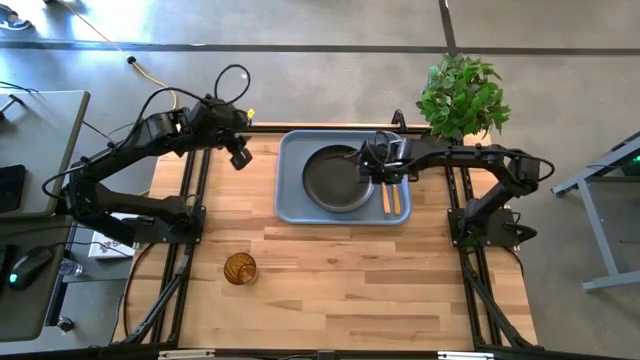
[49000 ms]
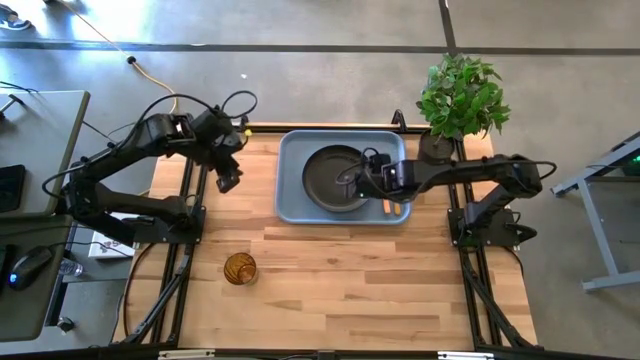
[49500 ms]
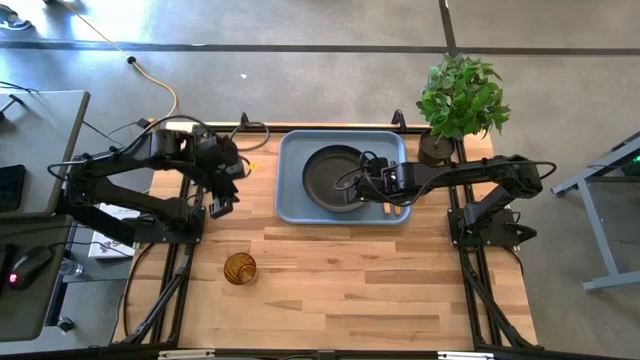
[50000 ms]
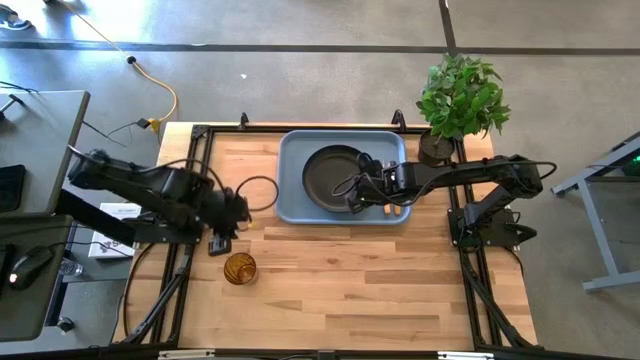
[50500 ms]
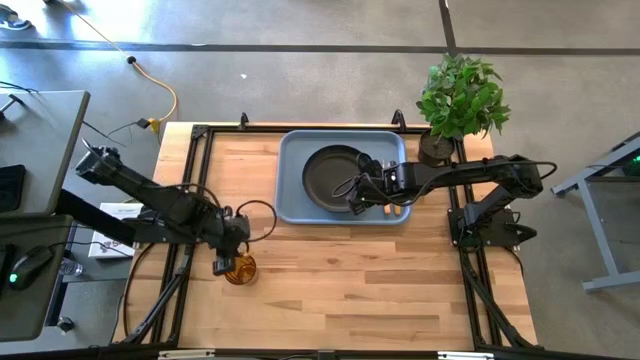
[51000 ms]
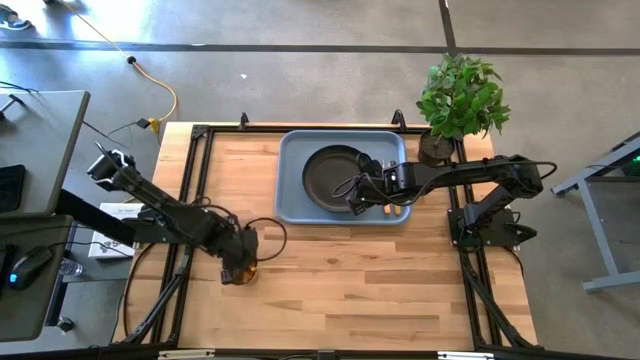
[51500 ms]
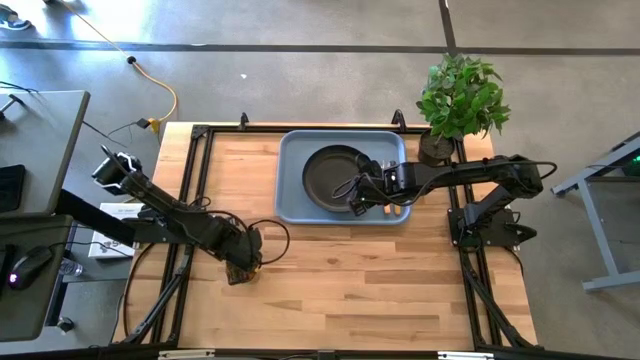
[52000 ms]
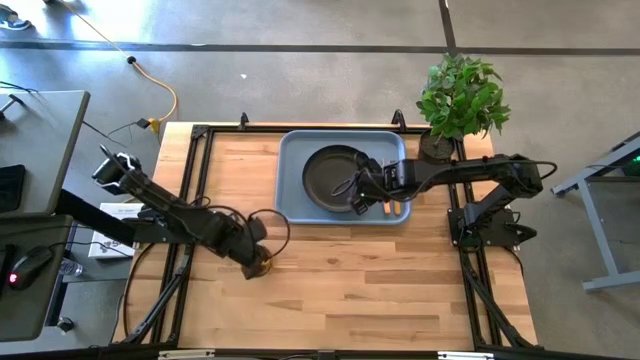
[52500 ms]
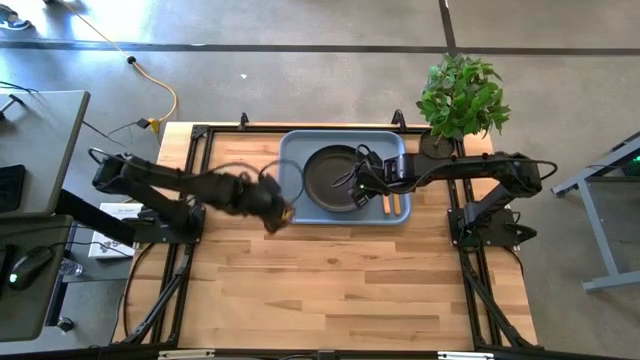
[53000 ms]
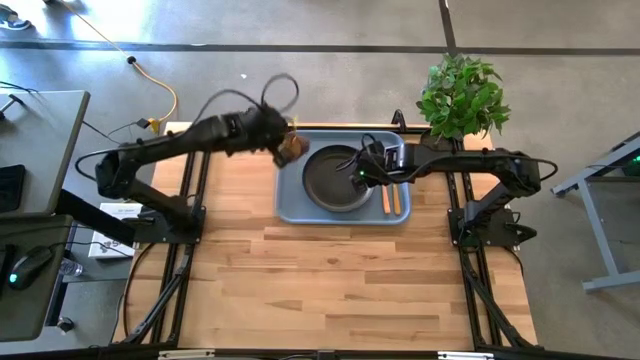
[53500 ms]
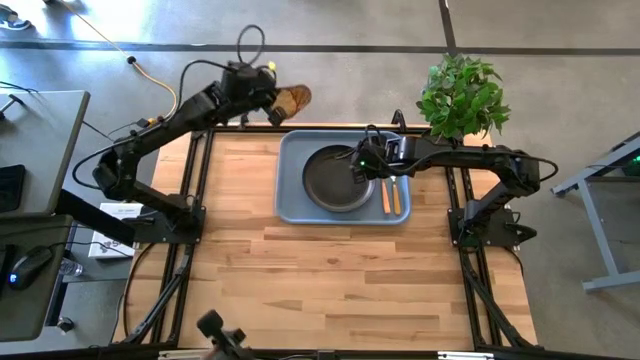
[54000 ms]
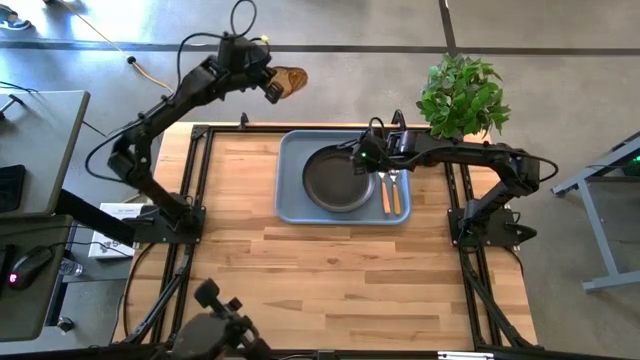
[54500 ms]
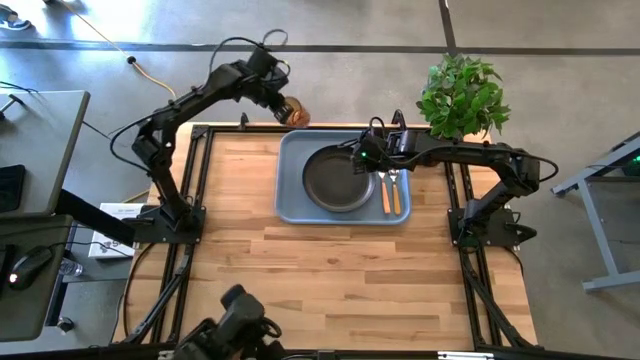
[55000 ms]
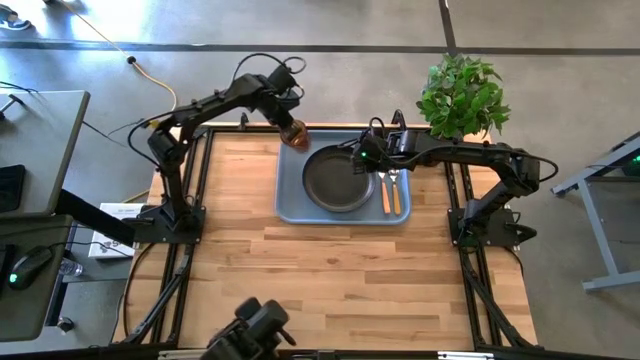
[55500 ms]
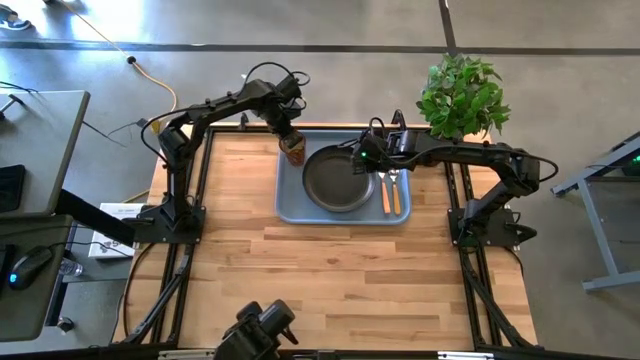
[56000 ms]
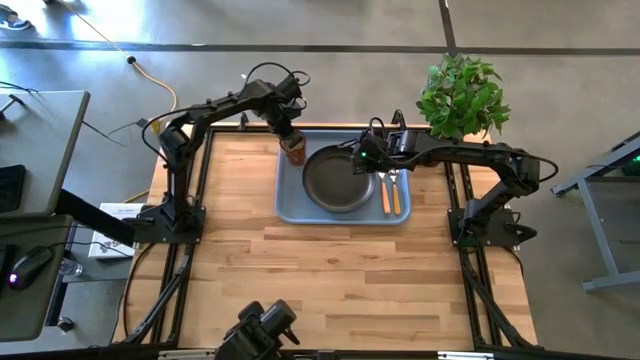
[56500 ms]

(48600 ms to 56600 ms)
Task: Pick and place plate/cup/fork/spoon on tray
Put the brown cup on the blue tray

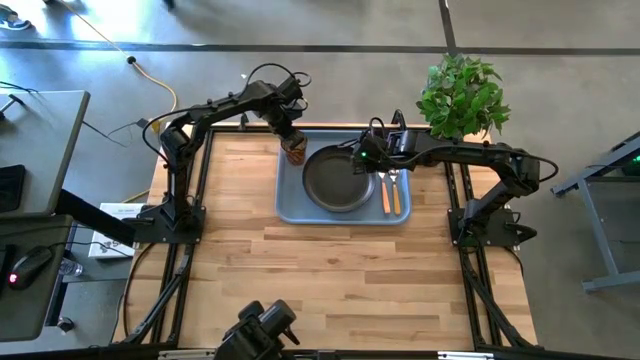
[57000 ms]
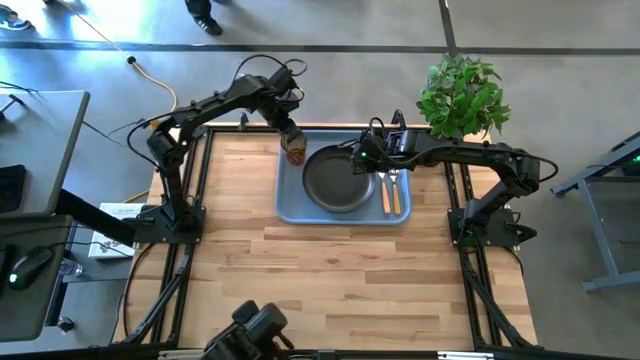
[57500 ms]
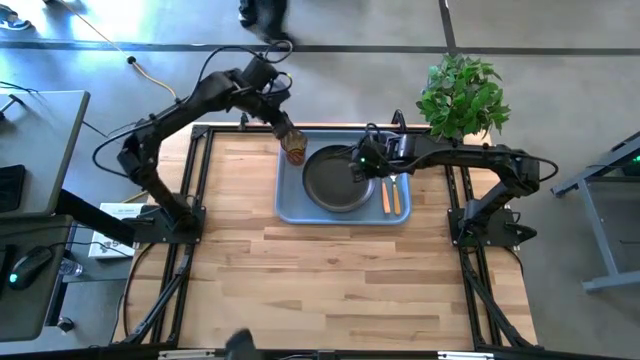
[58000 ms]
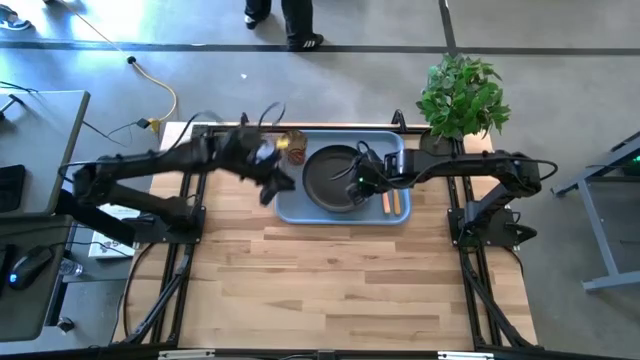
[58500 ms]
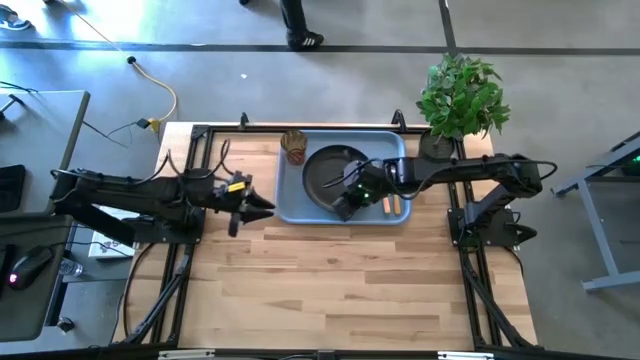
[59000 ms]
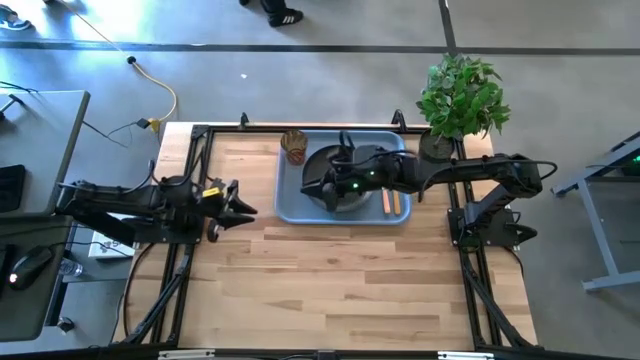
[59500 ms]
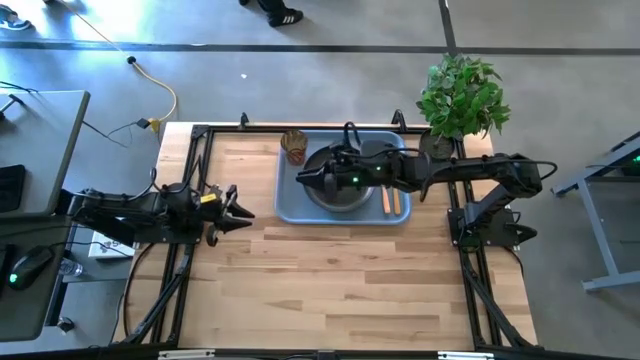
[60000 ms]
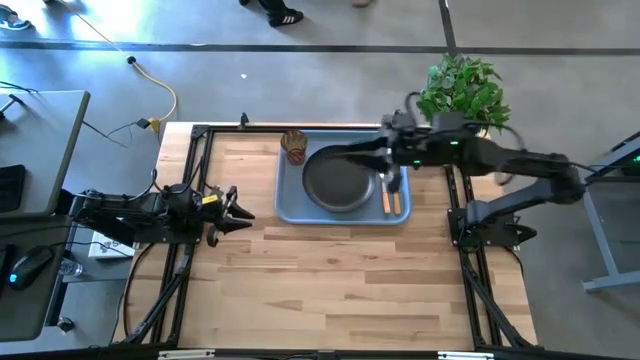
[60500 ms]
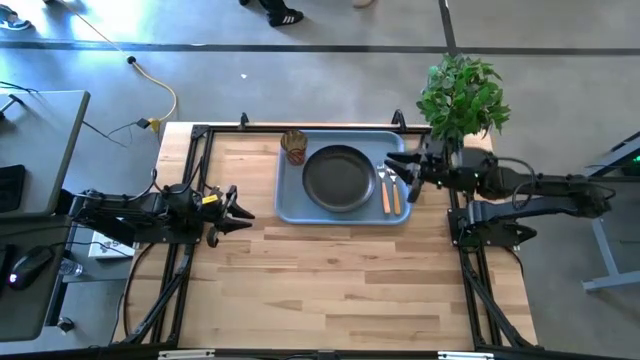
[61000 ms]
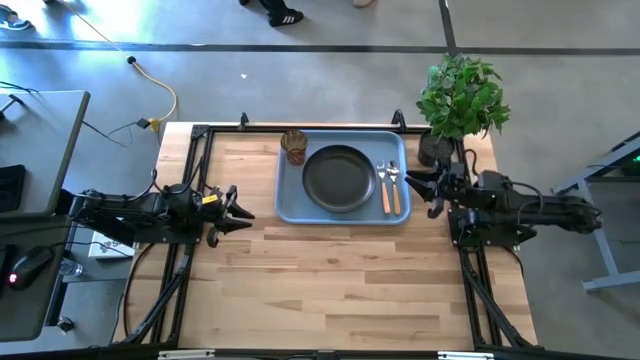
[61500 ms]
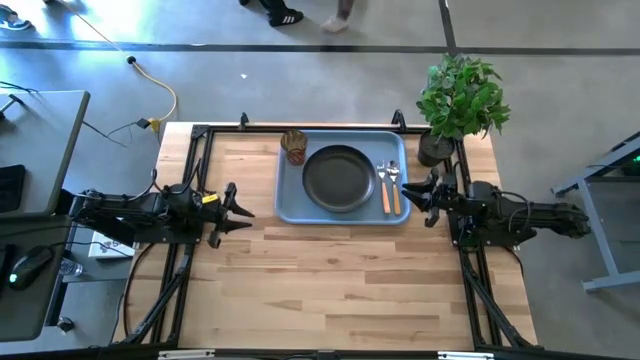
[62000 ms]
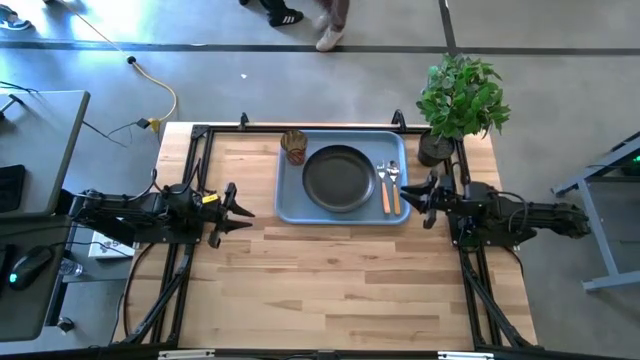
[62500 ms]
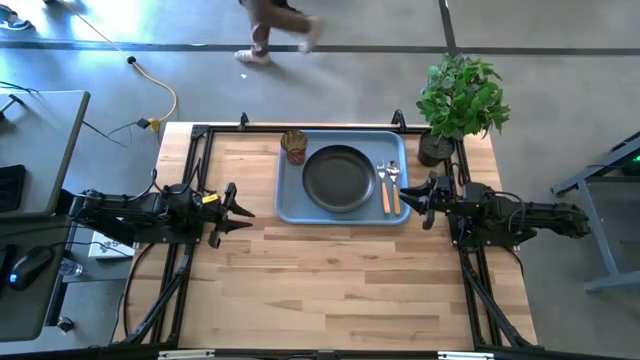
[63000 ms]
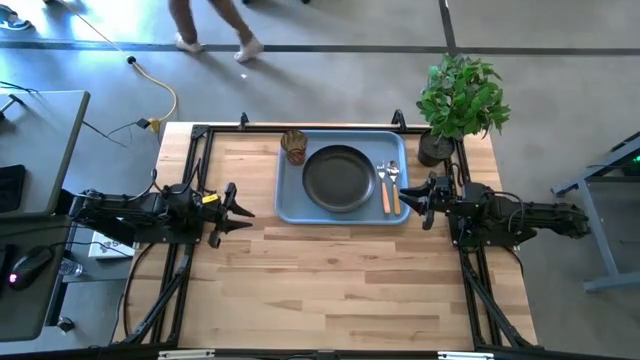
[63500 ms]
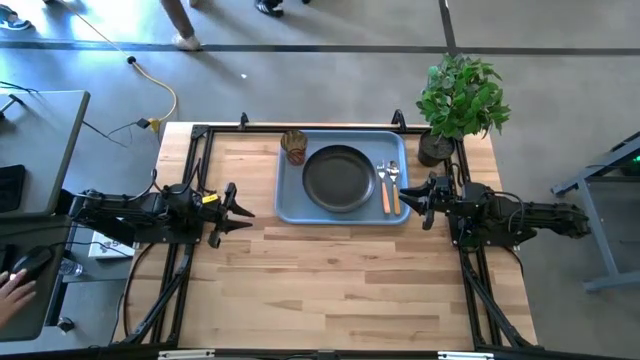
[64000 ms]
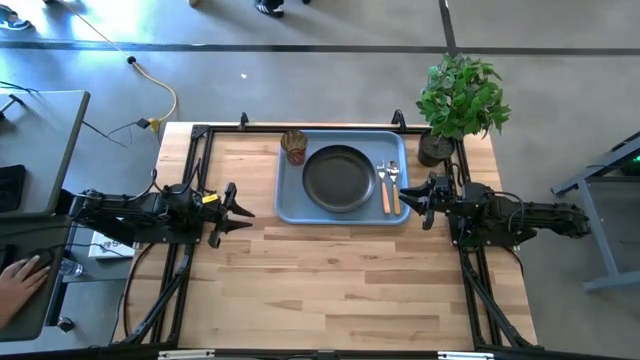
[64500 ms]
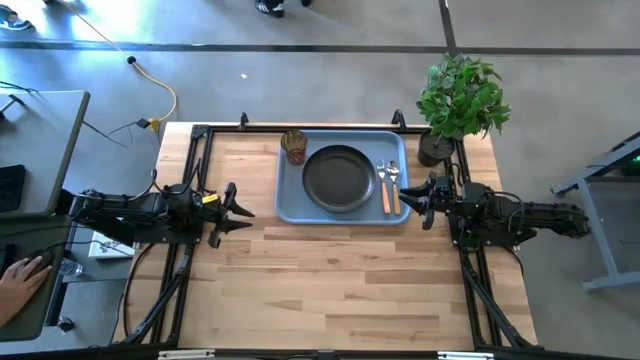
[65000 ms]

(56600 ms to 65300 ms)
Return to Home Position

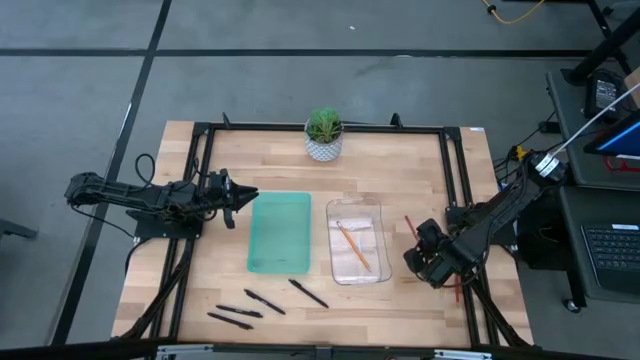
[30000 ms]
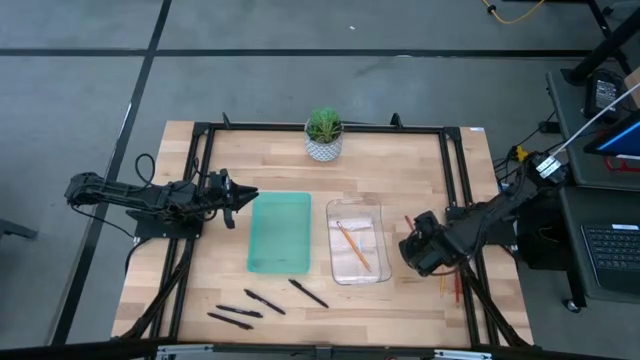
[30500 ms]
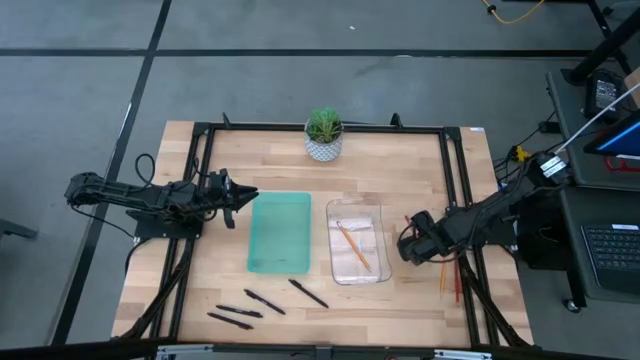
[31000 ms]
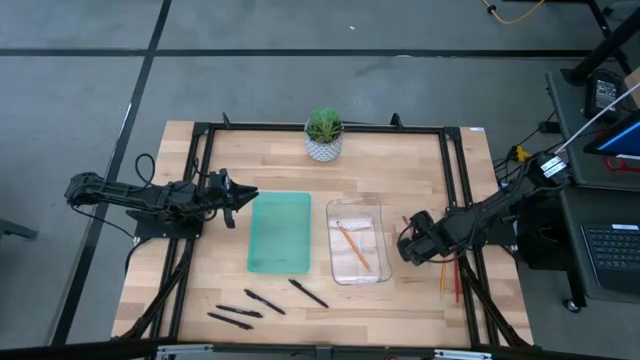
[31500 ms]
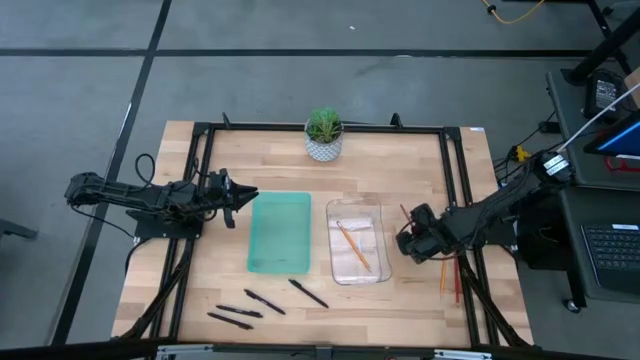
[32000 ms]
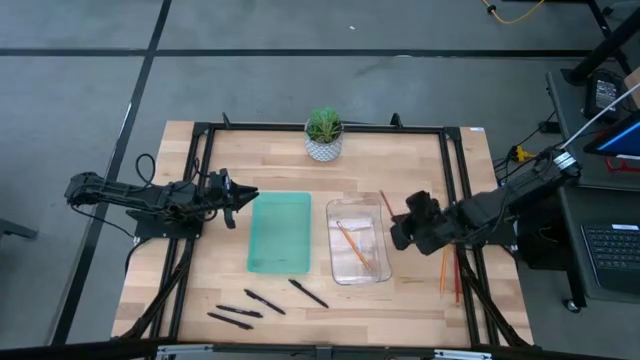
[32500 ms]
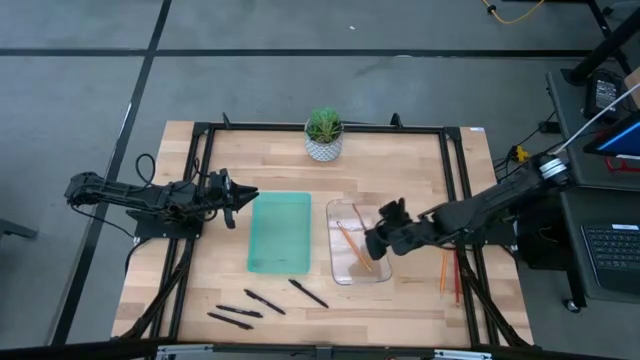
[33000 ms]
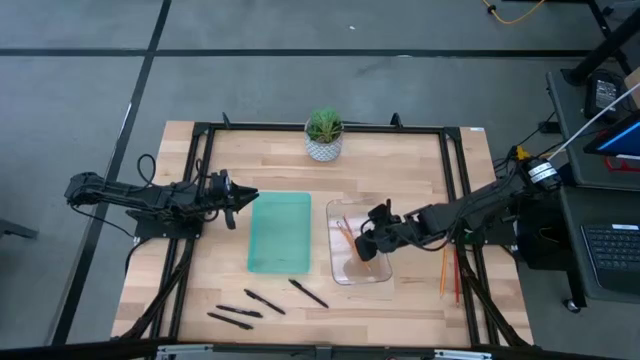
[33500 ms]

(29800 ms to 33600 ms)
Task: Sort pens & pencils
Put the red pencil into the transparent bin
